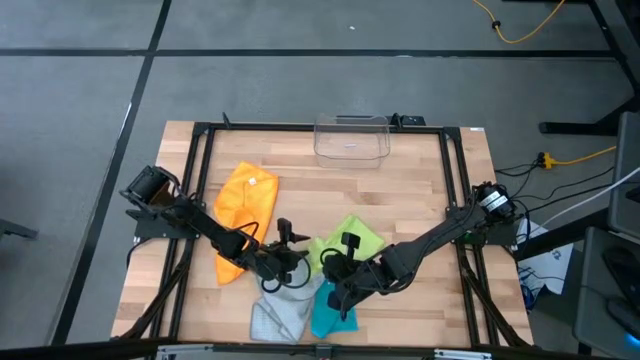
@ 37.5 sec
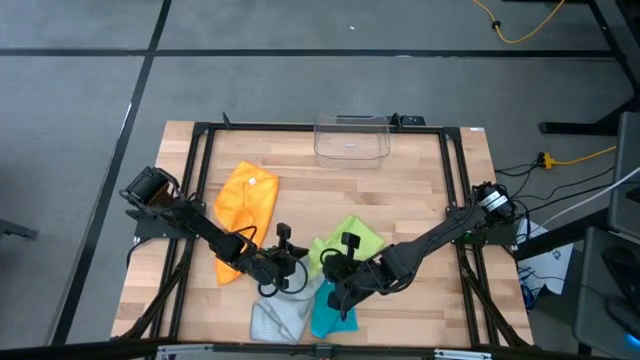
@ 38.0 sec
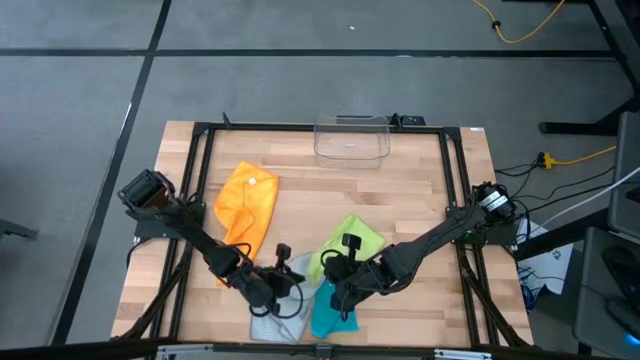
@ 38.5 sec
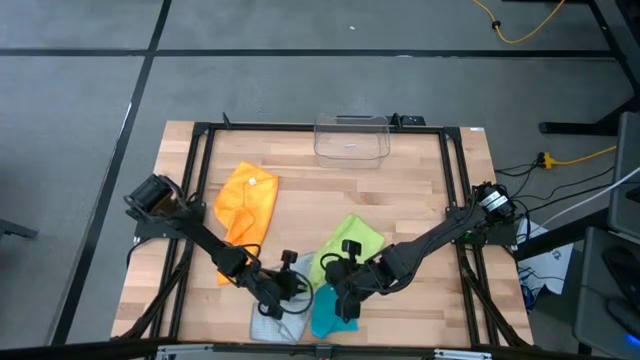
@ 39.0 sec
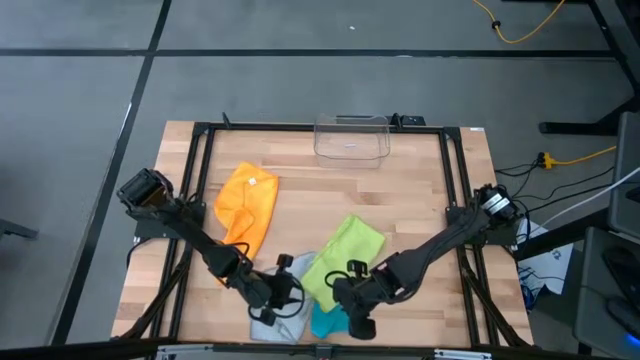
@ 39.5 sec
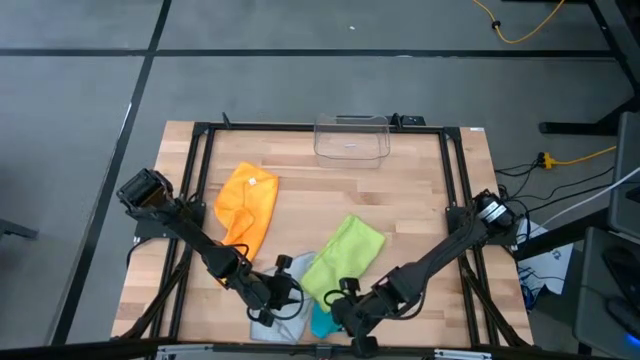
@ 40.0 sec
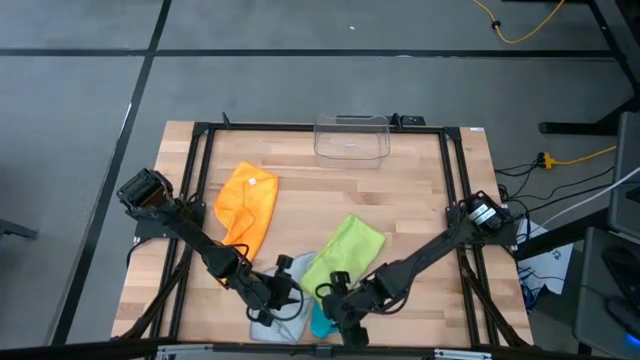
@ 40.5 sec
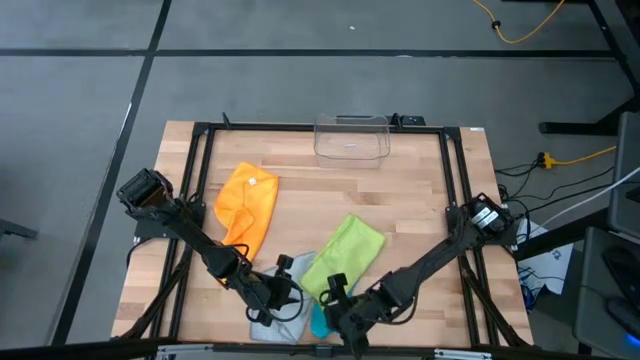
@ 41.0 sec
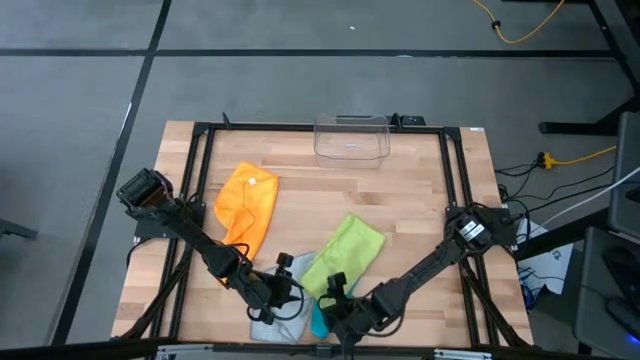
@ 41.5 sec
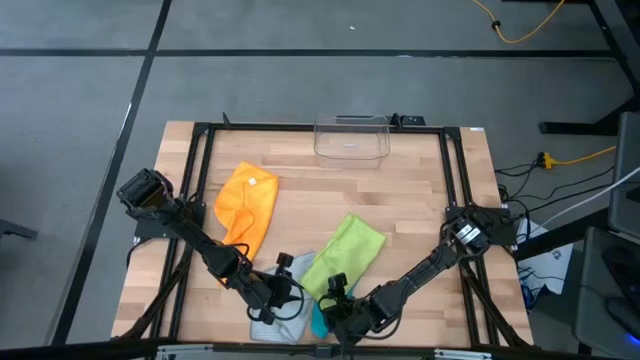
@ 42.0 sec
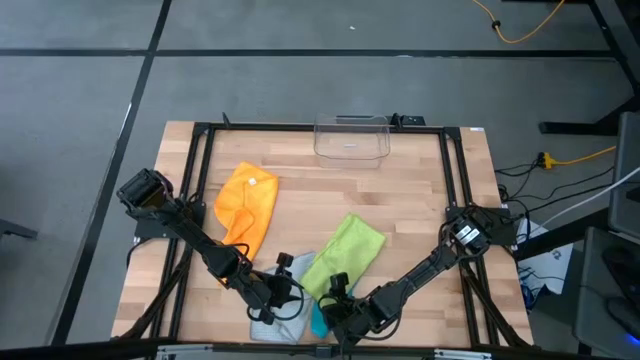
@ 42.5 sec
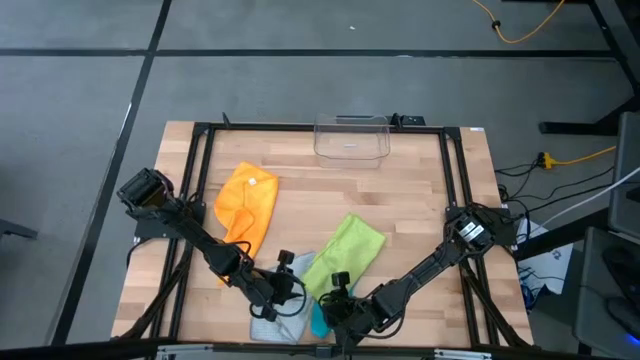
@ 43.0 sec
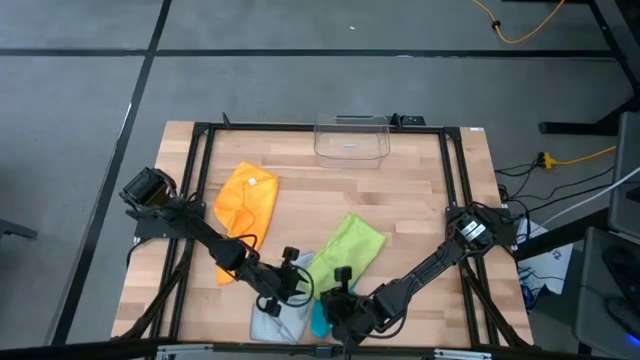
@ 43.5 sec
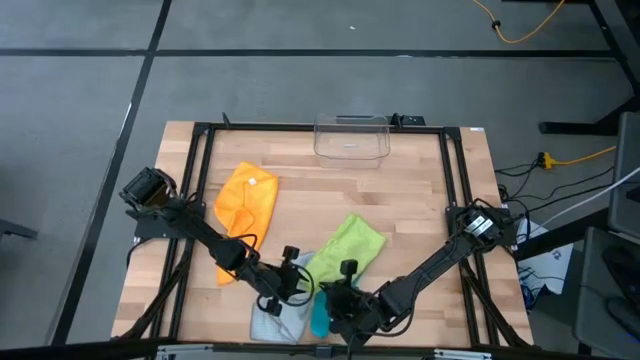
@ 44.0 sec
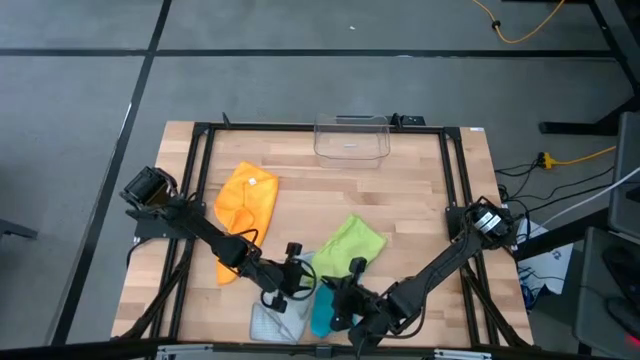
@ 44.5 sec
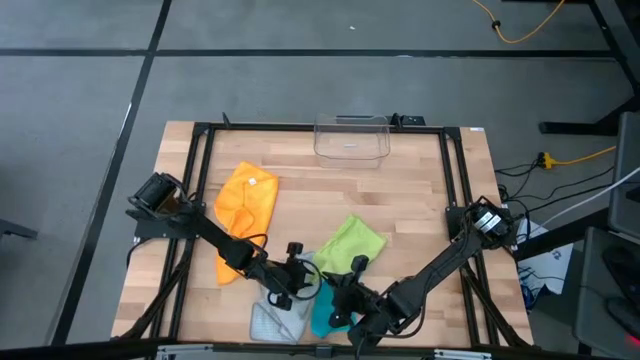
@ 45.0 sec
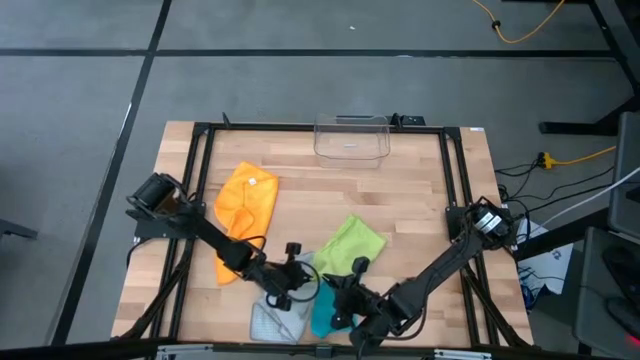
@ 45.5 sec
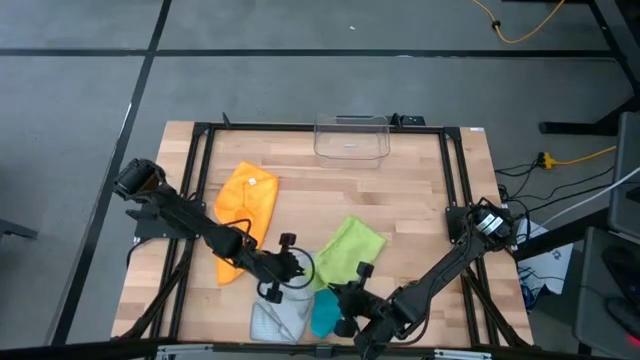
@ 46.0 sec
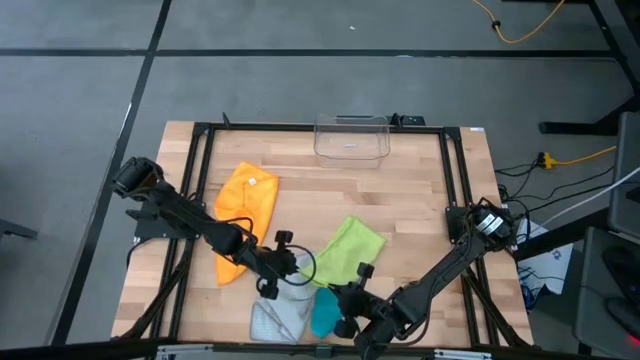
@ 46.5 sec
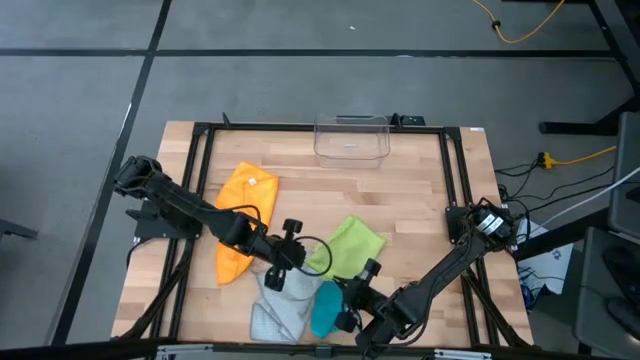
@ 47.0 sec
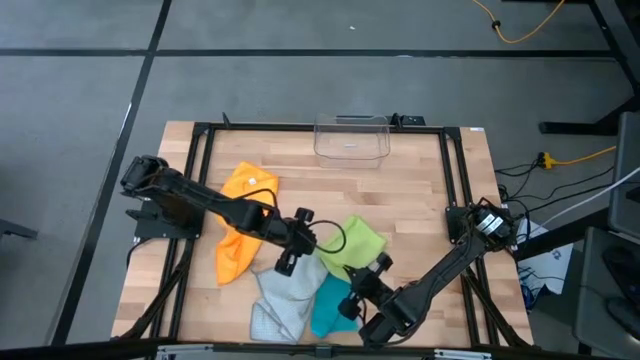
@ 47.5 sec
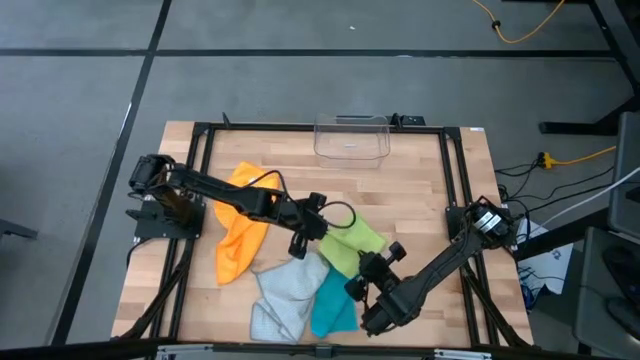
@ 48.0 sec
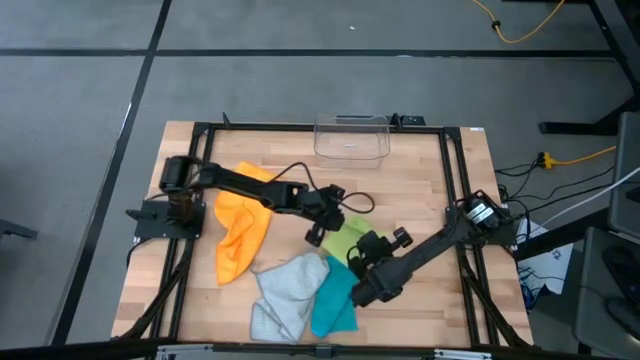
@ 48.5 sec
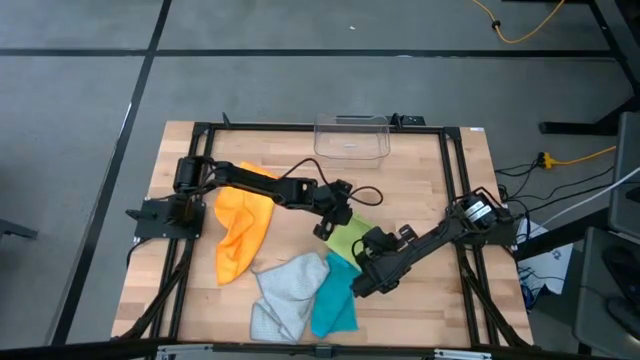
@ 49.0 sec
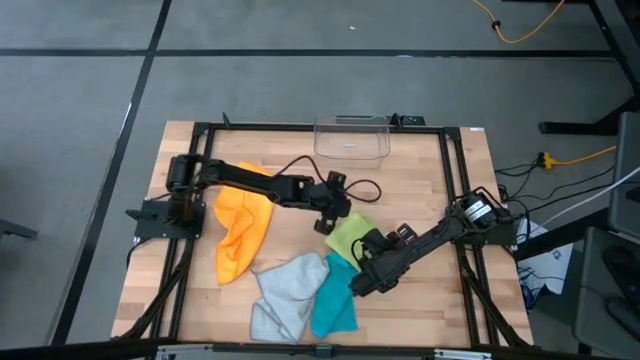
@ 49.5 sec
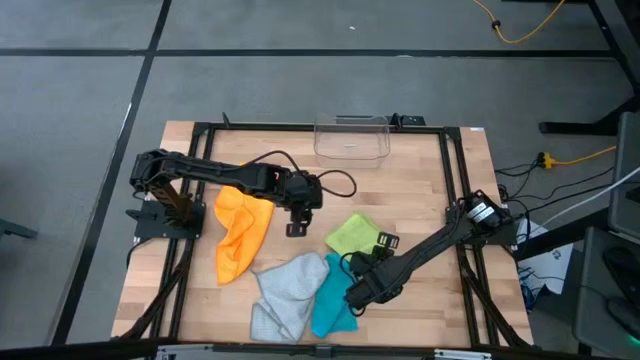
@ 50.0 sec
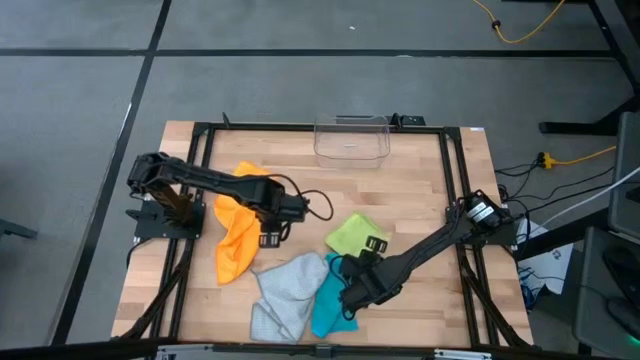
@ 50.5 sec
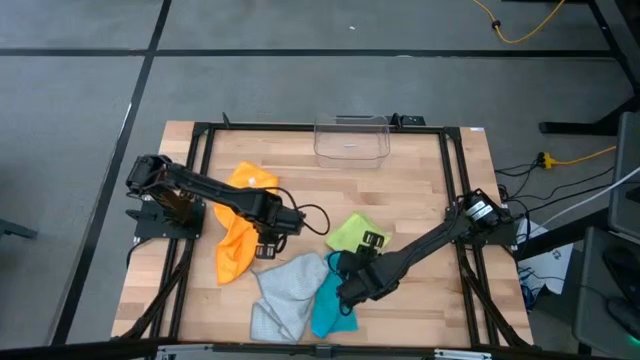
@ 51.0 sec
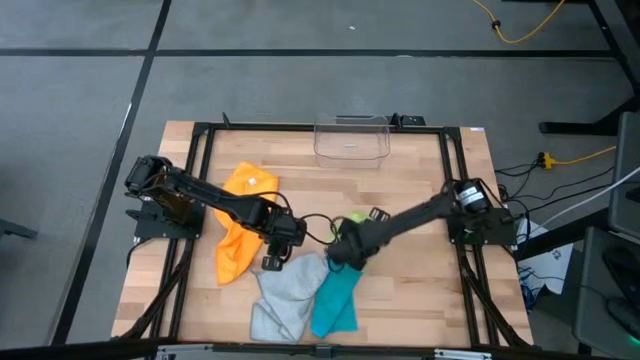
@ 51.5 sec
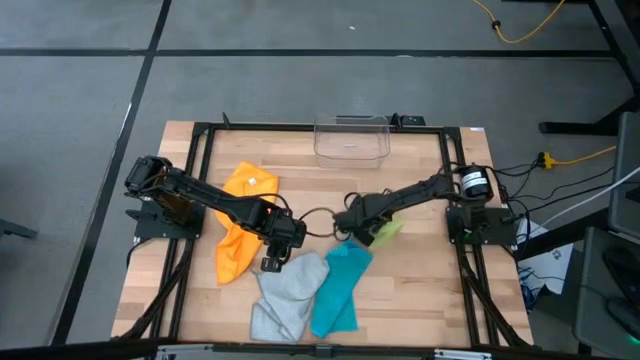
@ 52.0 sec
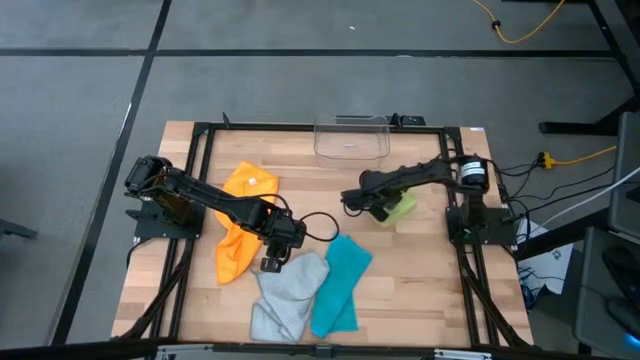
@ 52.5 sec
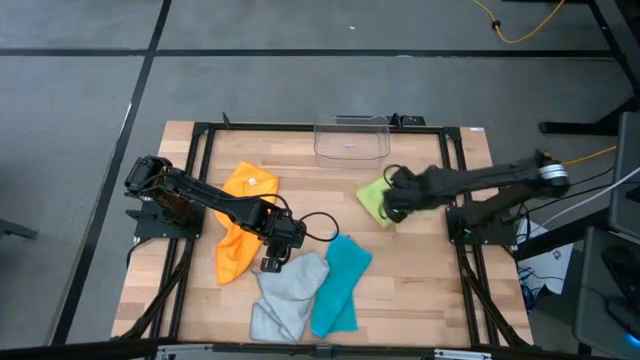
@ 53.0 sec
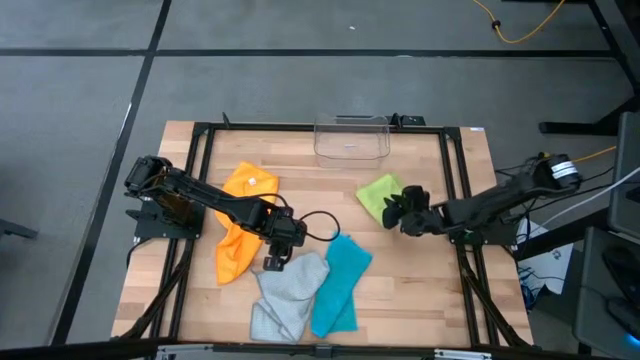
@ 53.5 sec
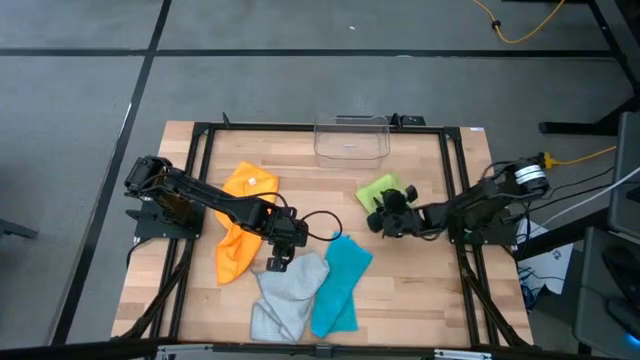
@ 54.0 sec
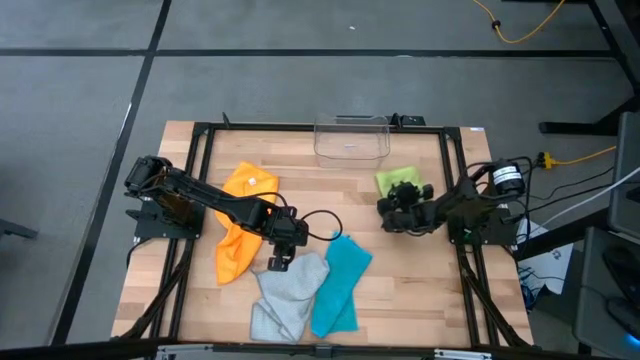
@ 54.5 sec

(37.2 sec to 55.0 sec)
Task: Fold microfiber towels
Fold the green microfiber towel

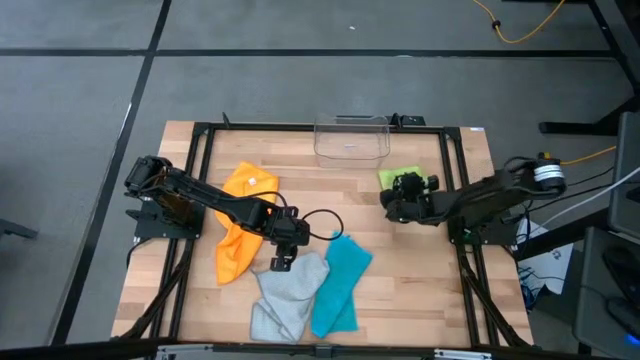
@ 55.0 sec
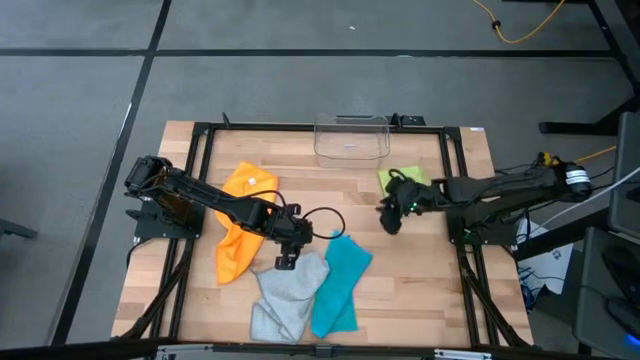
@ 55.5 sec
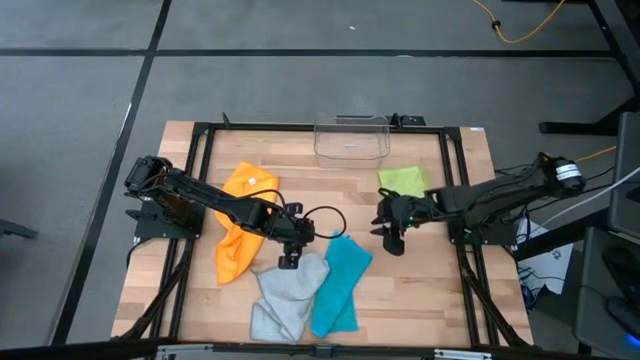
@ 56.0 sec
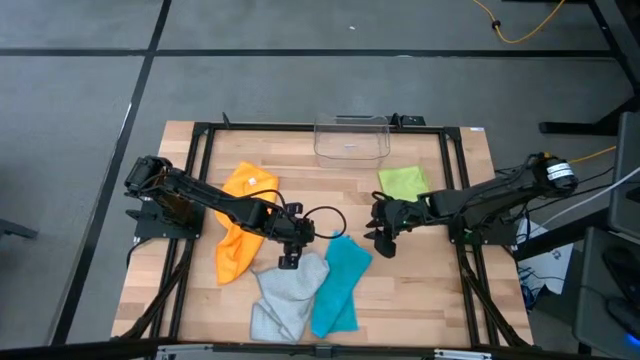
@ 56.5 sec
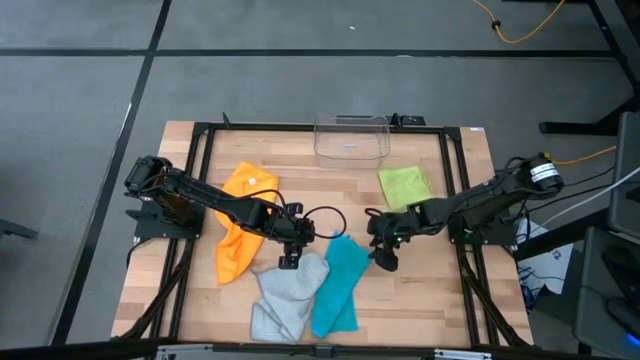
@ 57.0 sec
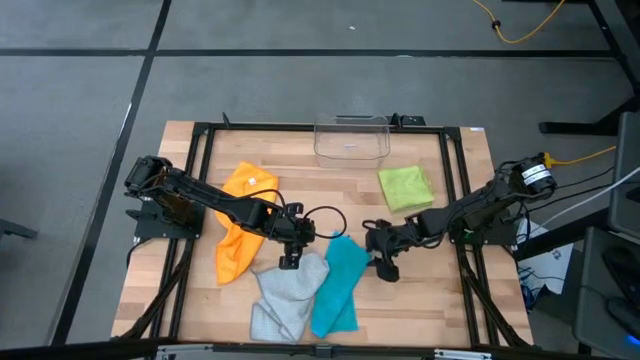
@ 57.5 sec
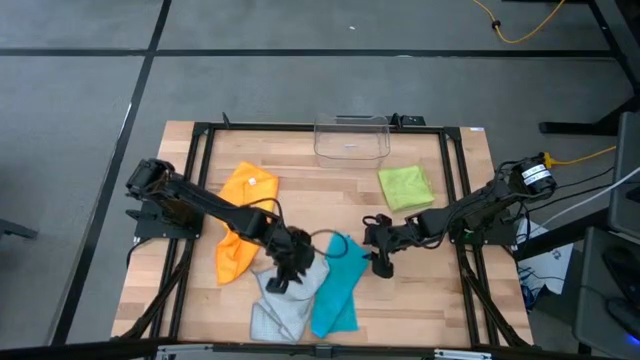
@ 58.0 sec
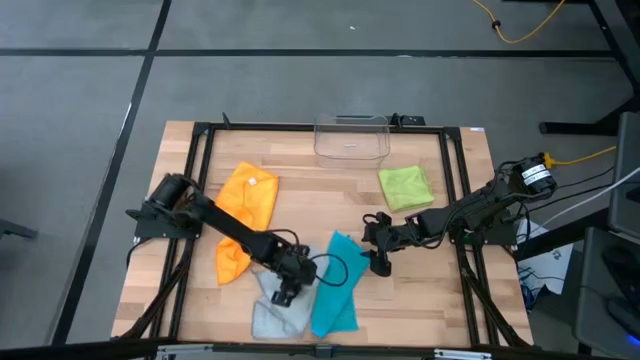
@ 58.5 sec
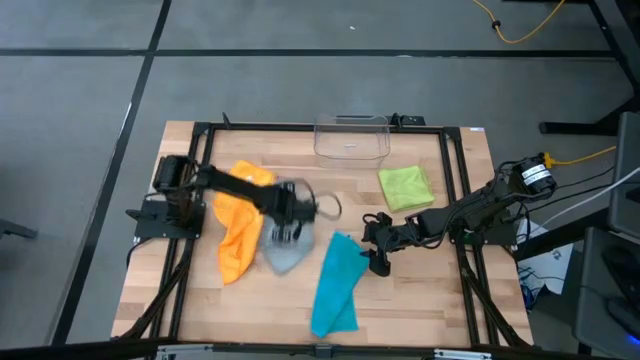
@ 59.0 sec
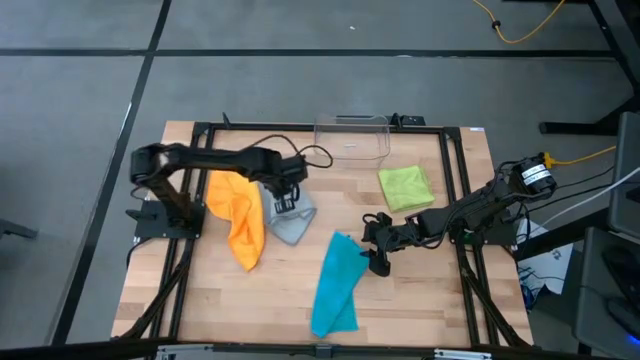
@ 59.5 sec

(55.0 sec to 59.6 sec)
Move the gray microfiber towel to the middle left of the table
